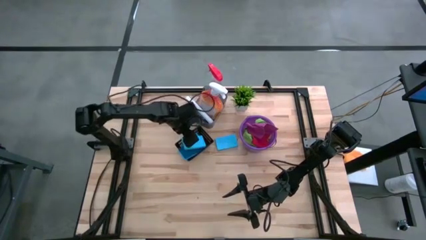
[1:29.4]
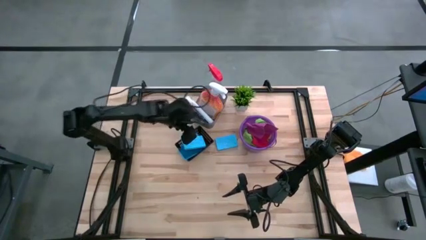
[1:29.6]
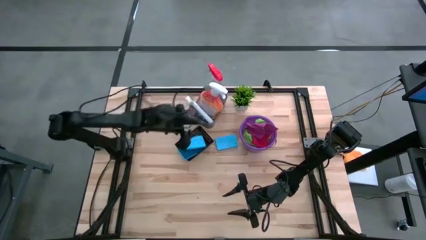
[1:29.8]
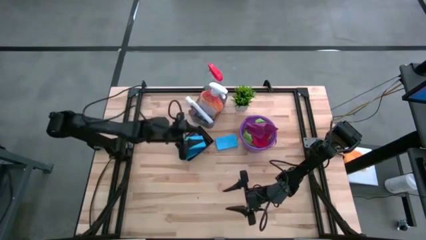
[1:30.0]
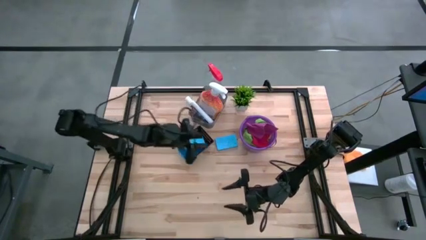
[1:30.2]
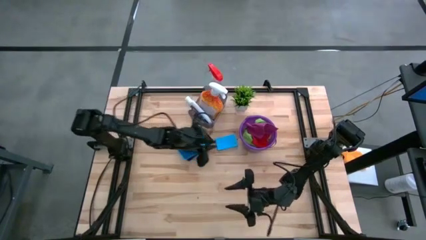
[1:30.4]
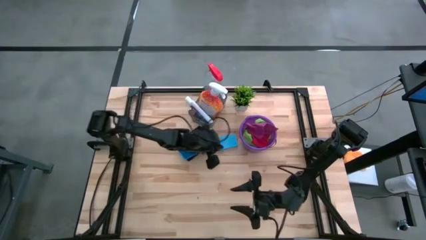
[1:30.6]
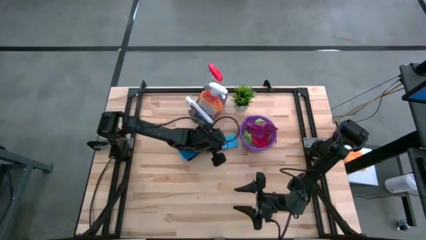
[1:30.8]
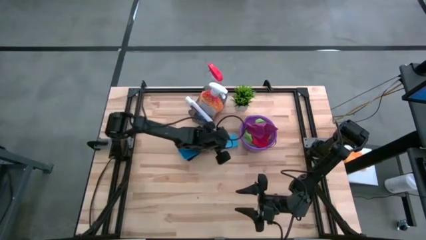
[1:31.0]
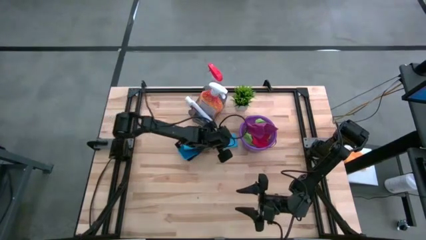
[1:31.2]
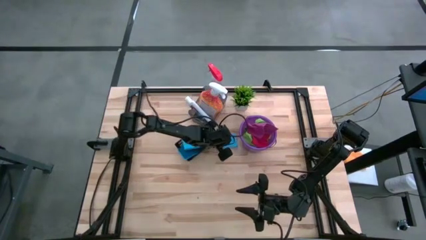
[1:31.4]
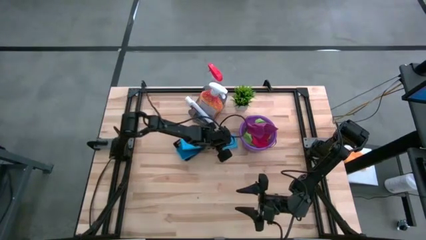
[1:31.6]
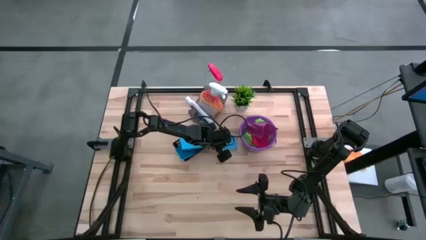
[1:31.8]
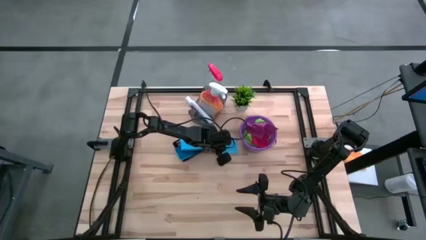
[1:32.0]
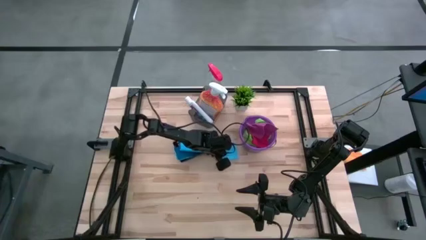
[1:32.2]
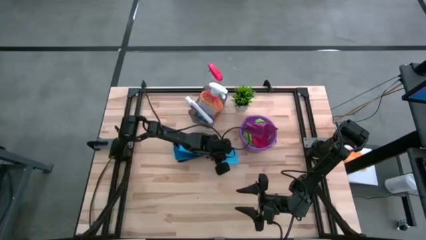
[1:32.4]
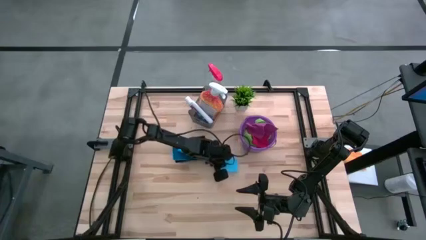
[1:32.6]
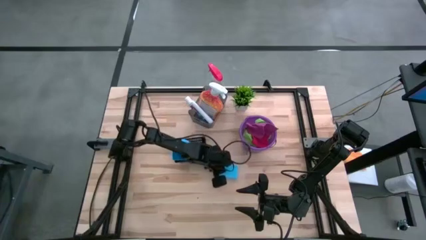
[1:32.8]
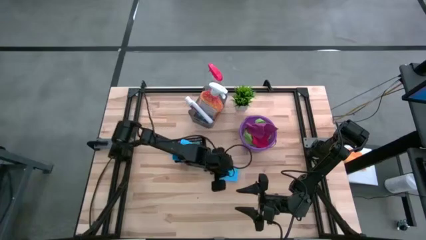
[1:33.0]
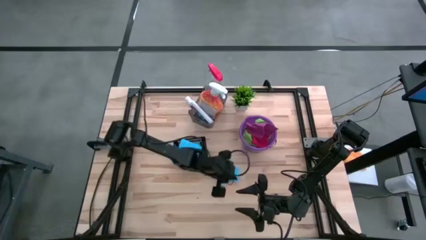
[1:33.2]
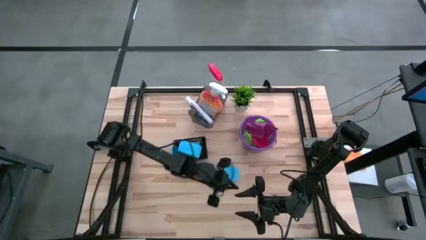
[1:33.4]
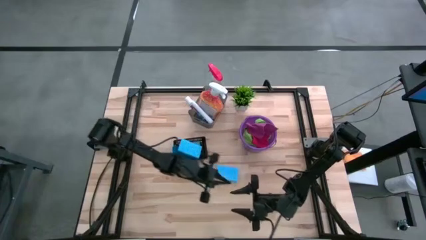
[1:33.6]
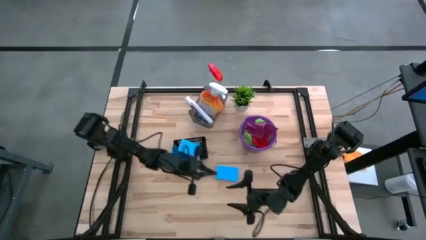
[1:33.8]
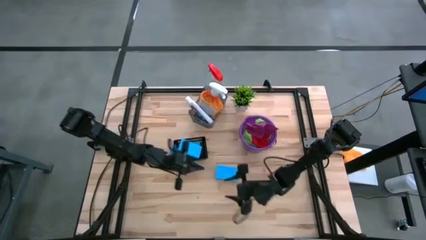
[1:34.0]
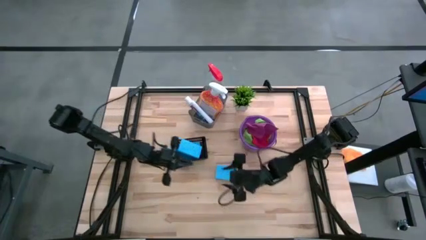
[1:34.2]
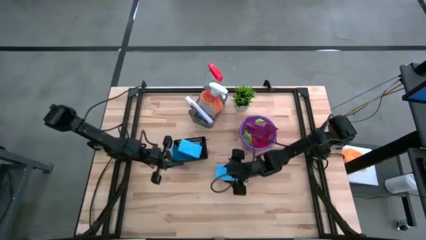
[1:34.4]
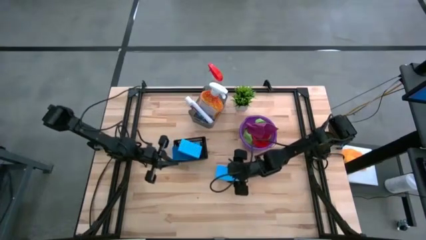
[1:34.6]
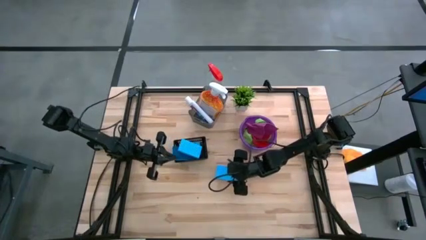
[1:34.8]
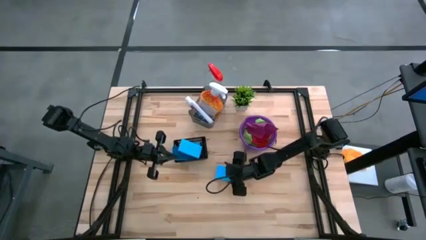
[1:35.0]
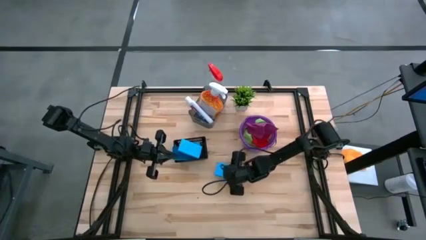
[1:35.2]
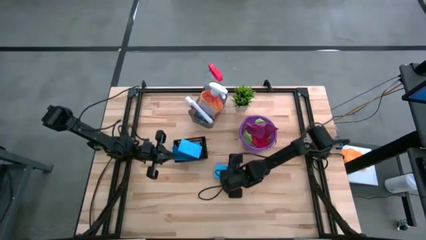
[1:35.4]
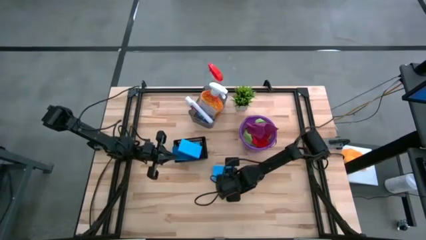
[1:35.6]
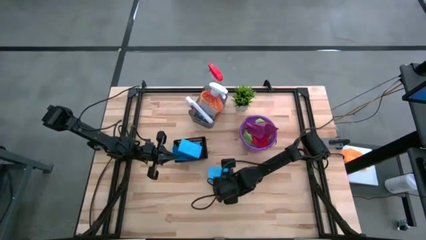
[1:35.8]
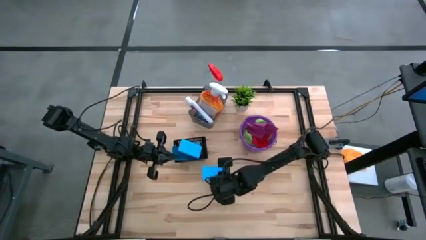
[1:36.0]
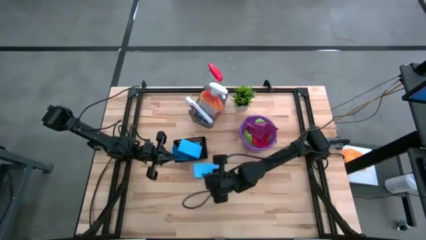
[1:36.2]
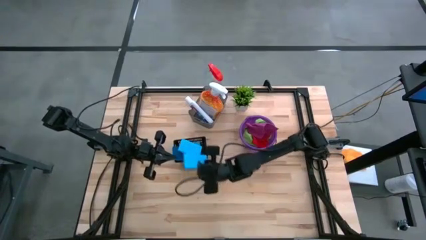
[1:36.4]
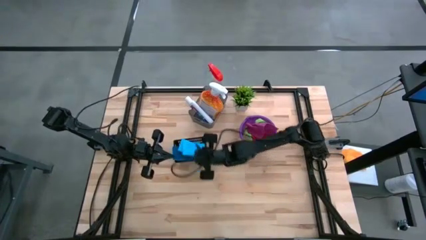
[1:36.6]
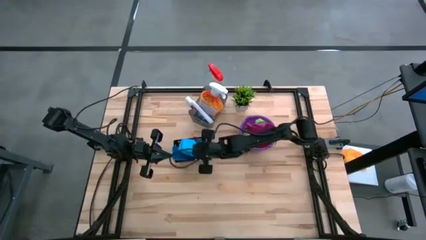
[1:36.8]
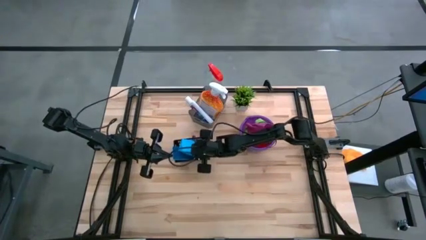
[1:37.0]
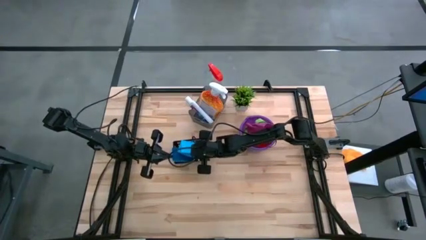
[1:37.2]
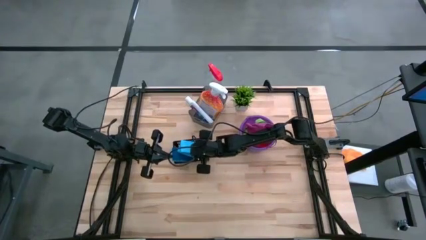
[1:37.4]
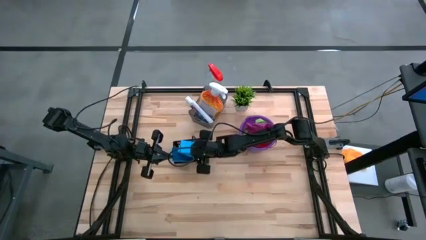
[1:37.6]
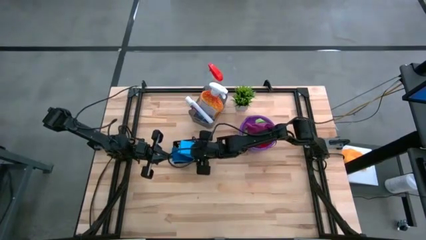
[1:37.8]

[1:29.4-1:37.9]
Task: Pick & Place Kitchen Items
Put the blue sponge into the black basket

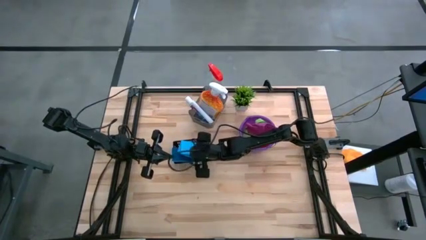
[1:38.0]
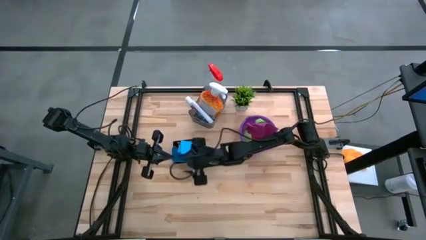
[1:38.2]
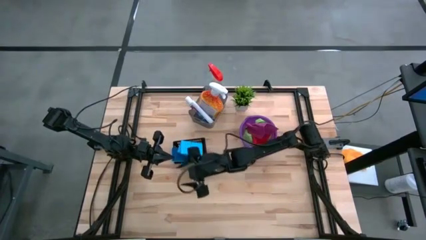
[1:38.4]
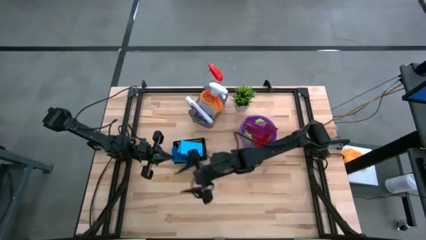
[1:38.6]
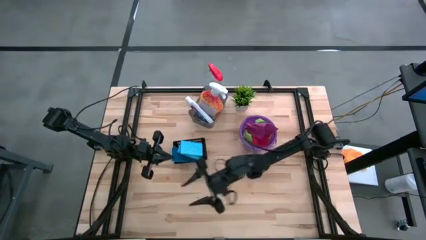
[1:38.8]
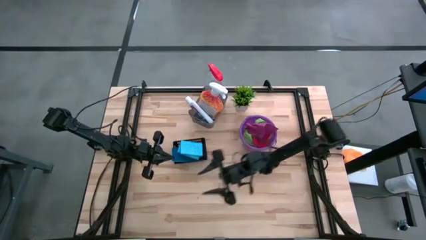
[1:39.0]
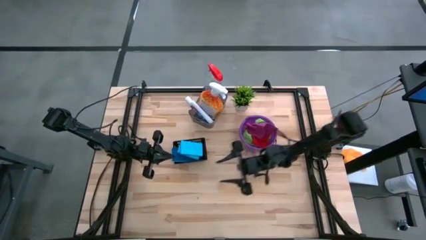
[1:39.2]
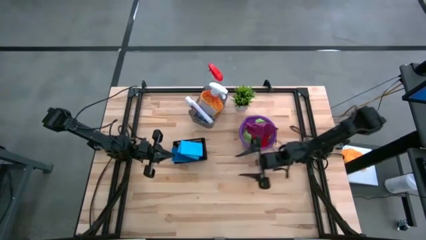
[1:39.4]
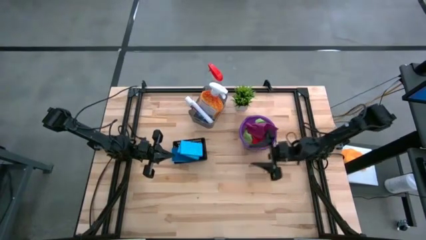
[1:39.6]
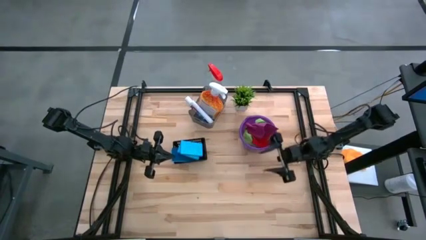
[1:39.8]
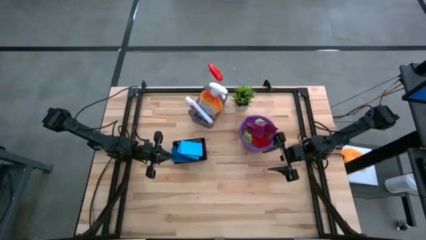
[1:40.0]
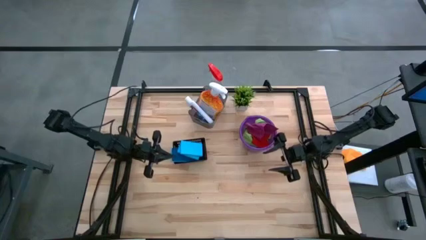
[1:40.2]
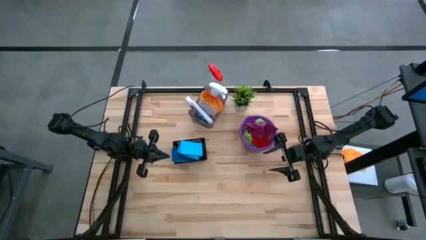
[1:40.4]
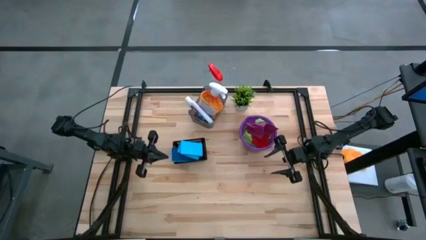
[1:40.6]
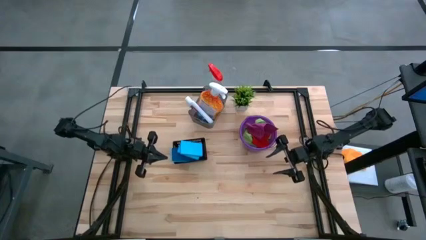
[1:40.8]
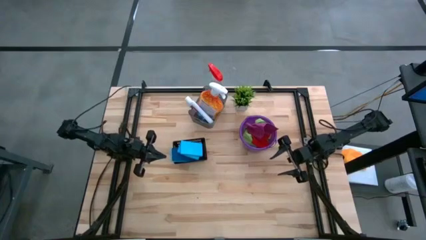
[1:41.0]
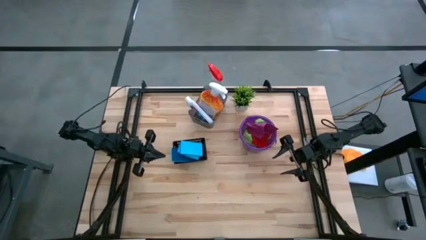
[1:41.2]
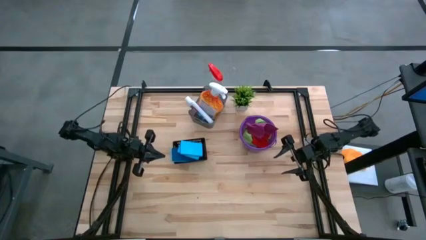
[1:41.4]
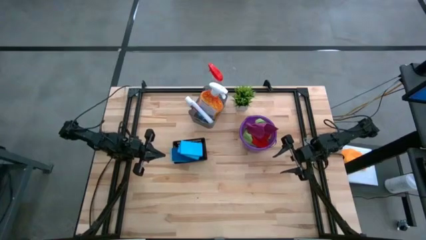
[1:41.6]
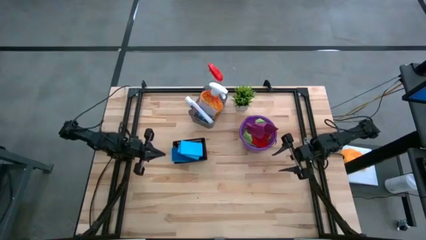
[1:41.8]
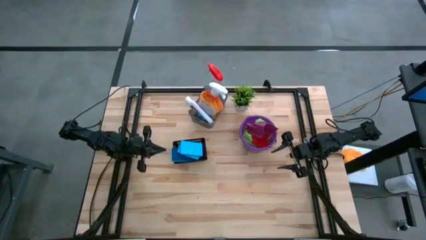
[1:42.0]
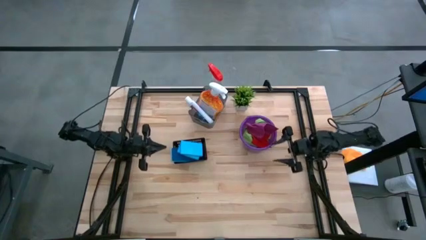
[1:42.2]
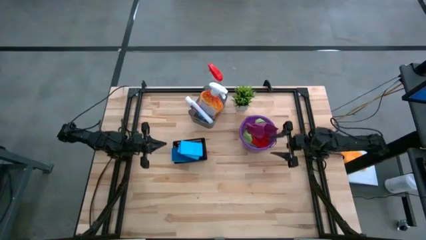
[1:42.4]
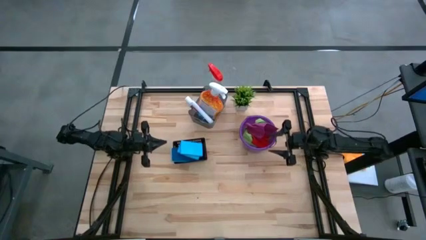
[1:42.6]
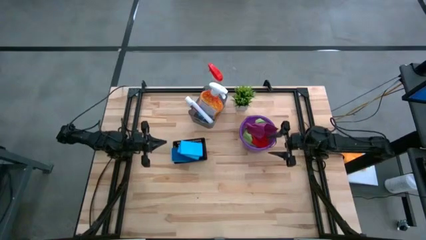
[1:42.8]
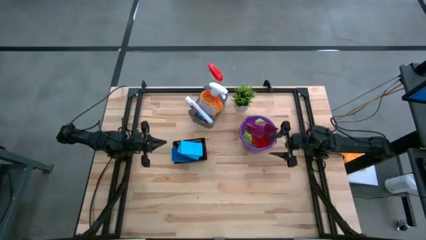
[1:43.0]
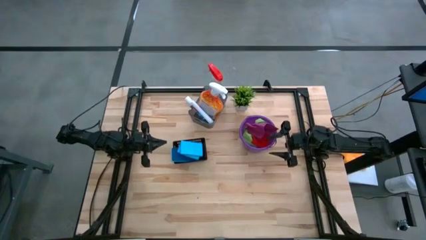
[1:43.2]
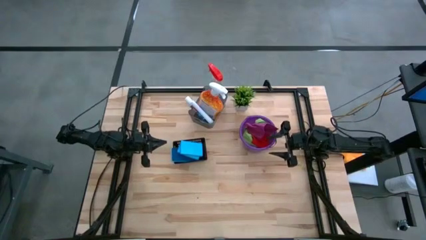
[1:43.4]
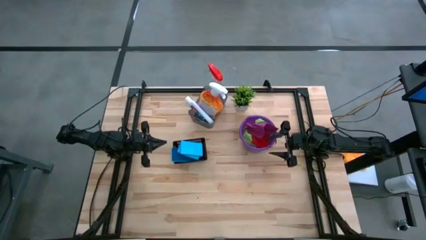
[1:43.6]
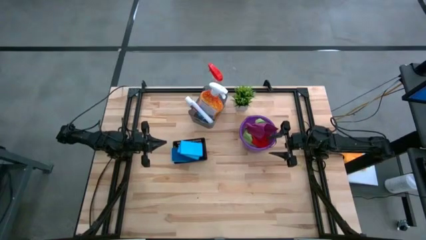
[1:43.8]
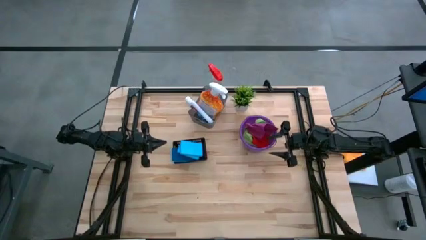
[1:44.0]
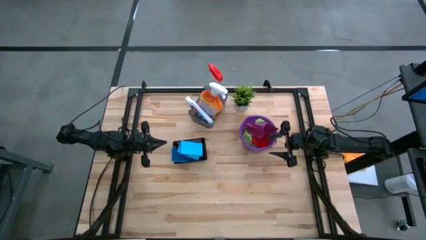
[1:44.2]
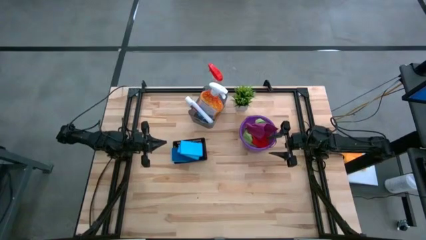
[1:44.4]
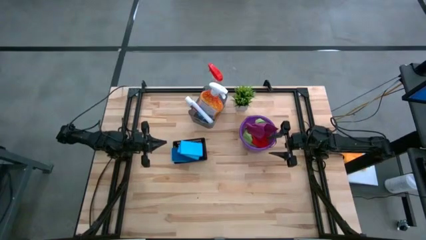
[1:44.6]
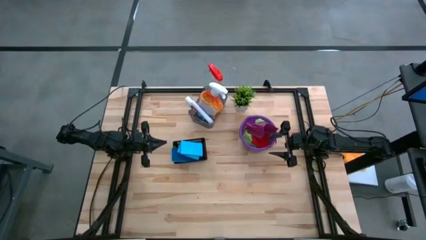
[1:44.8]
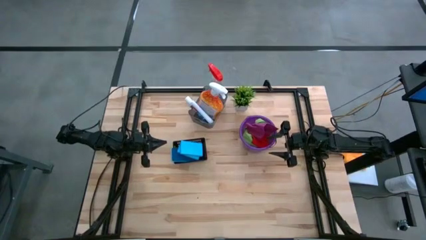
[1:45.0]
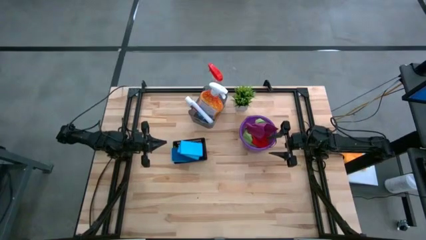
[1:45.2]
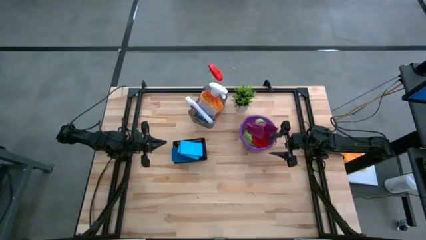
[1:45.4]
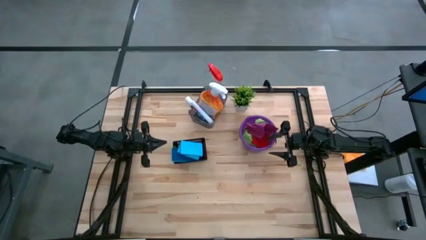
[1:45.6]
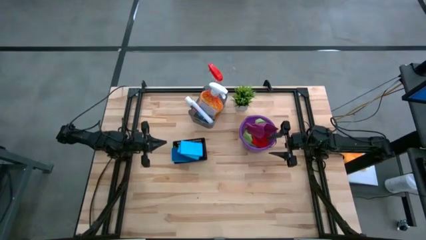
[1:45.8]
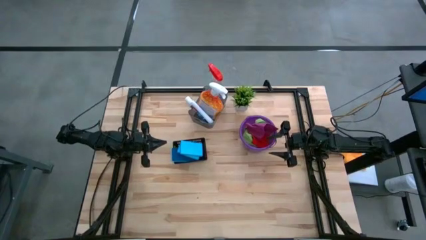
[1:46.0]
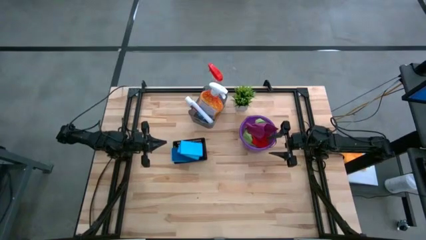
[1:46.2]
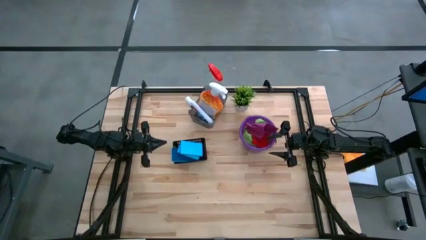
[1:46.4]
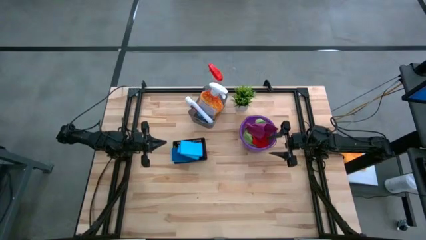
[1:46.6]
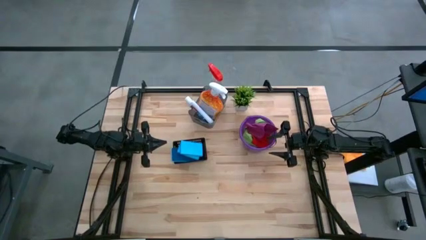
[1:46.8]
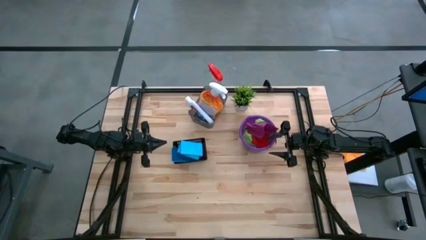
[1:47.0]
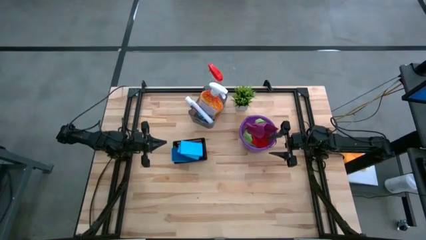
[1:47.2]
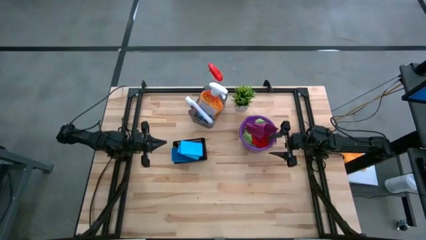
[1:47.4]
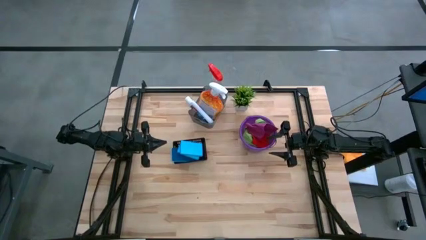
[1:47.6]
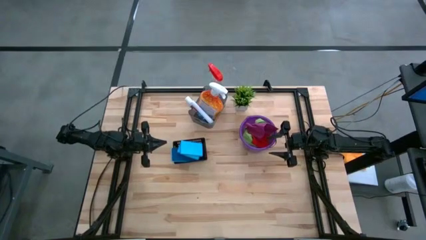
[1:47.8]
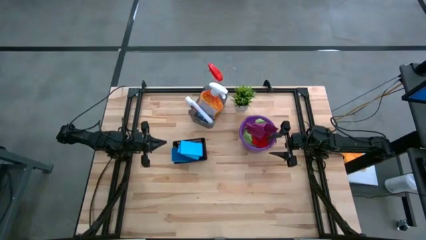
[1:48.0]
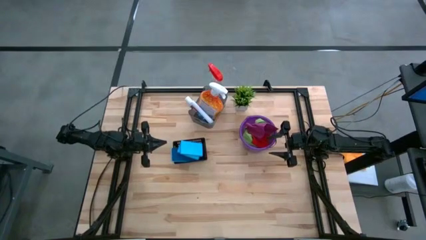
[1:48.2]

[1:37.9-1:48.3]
Return to Home Position
